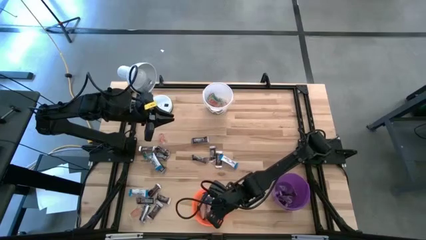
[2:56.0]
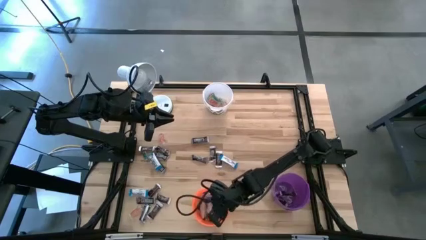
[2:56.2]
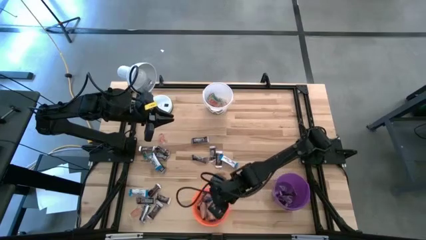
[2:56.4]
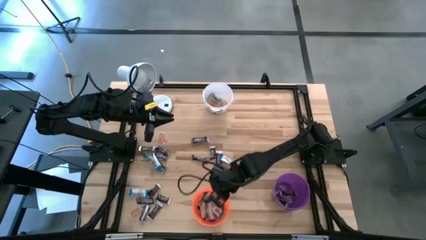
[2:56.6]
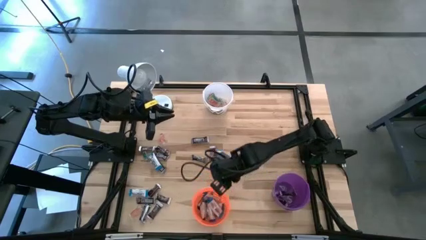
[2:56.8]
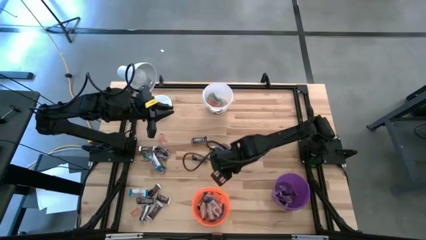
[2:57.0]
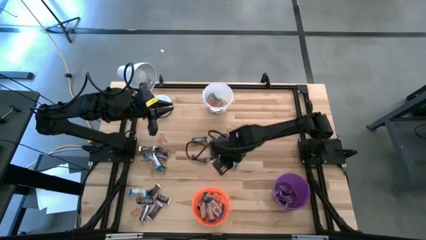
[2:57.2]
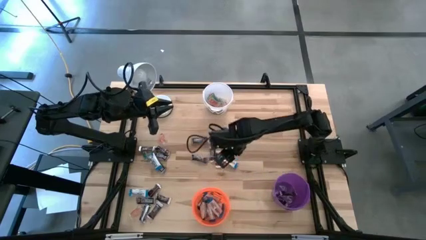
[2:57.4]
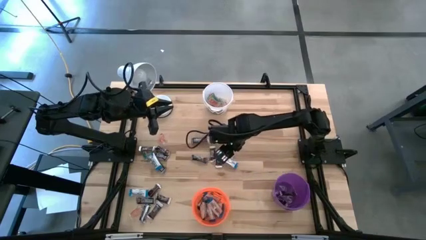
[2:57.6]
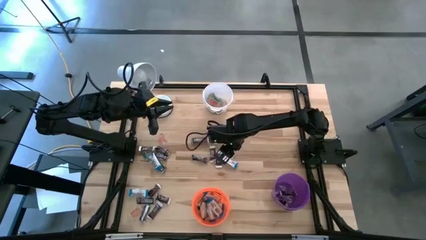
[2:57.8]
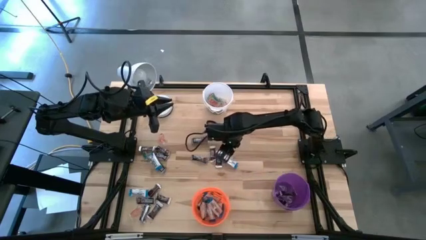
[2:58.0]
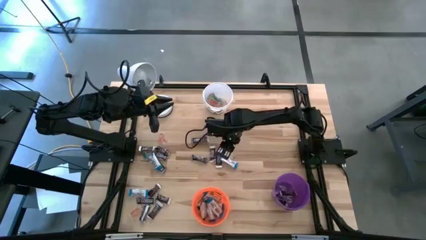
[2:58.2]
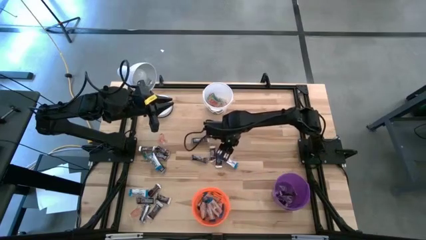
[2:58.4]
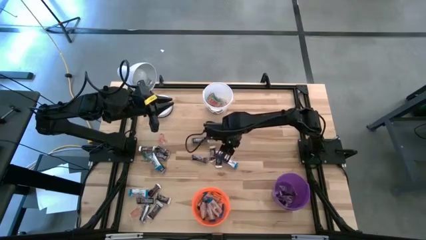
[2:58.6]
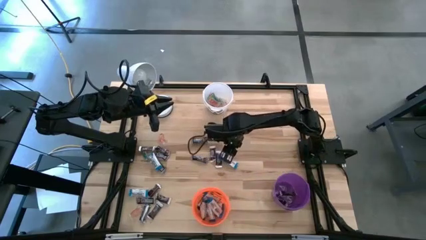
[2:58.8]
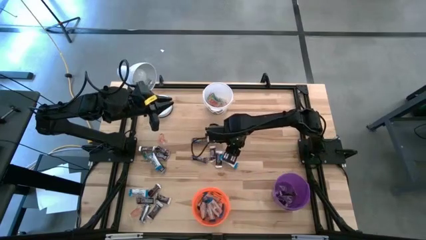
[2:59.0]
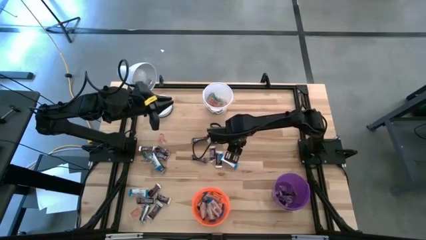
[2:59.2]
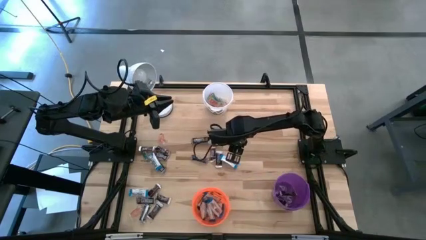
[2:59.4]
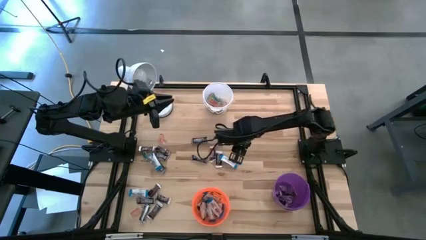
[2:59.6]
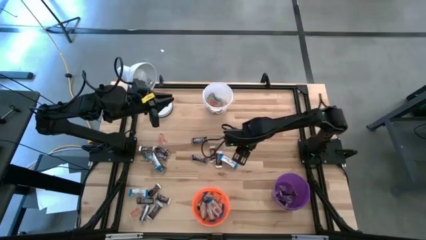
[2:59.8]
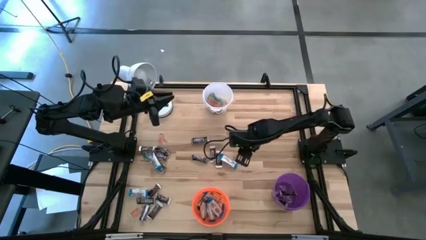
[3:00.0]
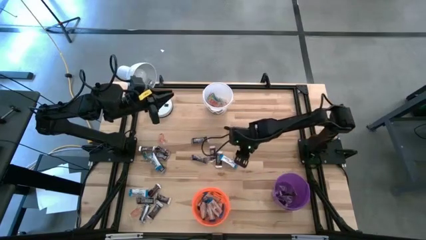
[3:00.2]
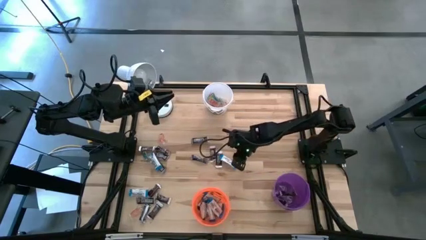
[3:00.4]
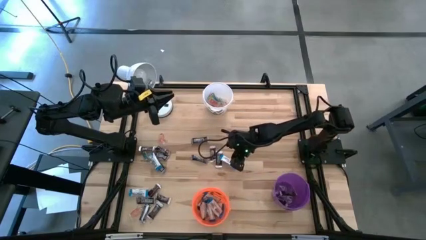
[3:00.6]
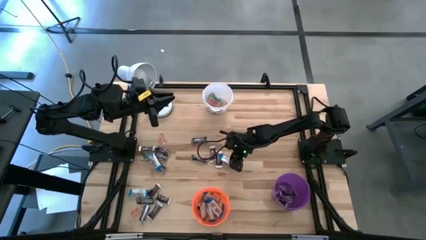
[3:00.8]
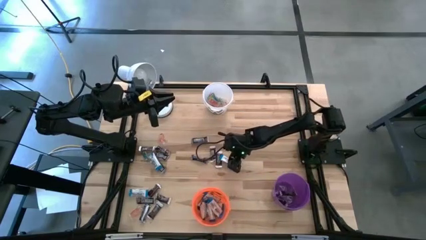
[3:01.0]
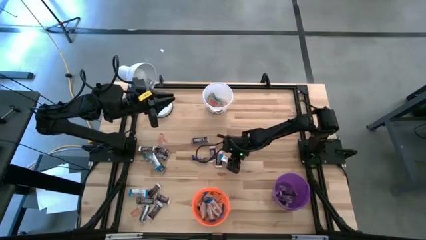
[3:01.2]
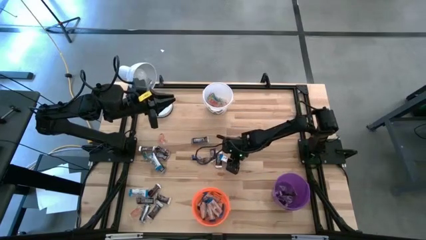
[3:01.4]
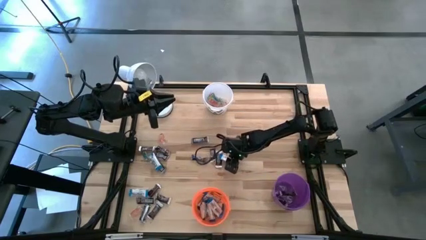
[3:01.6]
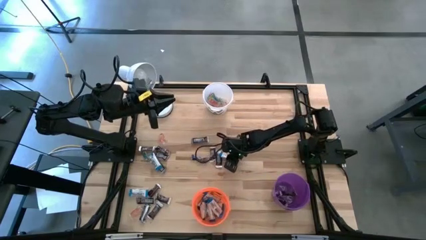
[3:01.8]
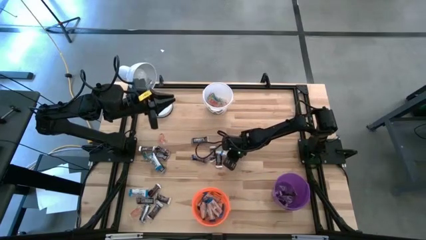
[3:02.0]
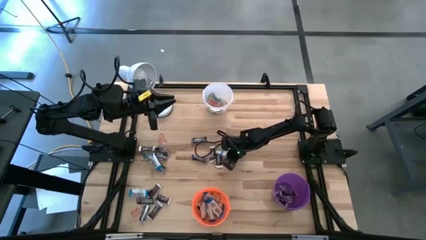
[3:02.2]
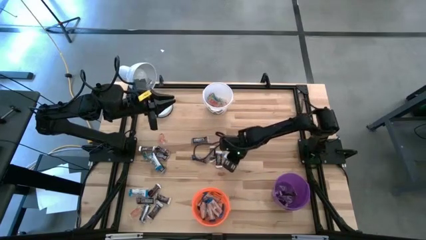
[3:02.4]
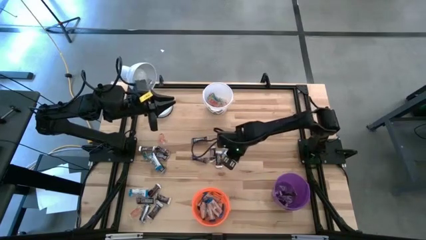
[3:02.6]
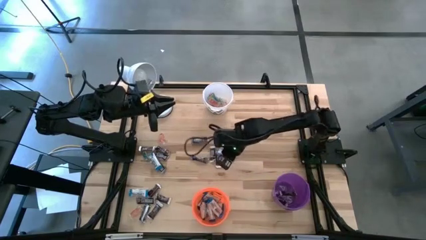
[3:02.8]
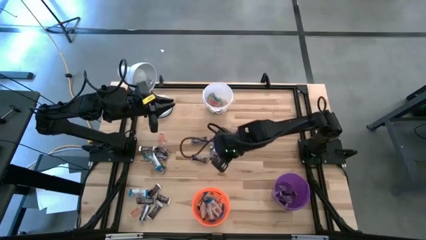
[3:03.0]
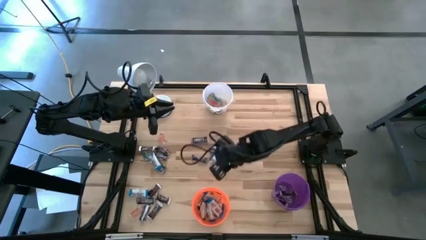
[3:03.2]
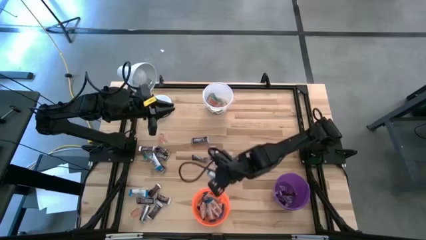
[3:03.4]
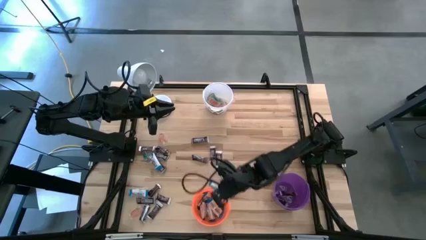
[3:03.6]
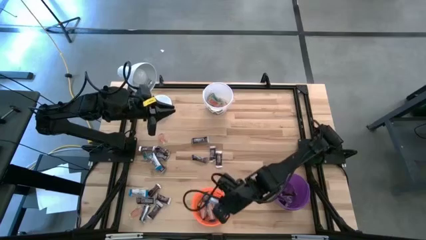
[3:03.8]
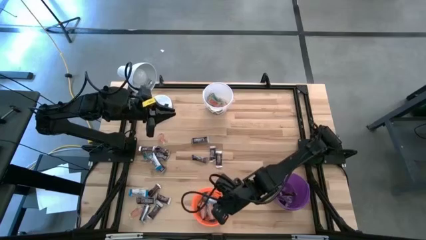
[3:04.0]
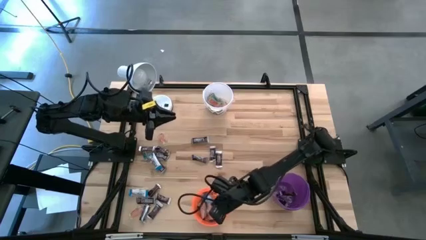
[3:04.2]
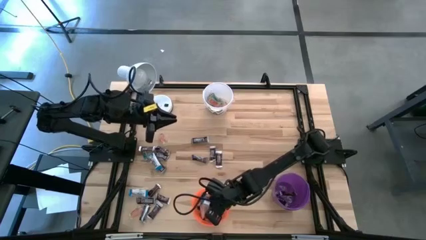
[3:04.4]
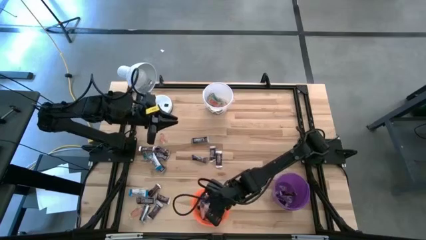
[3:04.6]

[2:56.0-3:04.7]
Task: Organize candy in baskets
Put the white chocolate bar into the orange bucket

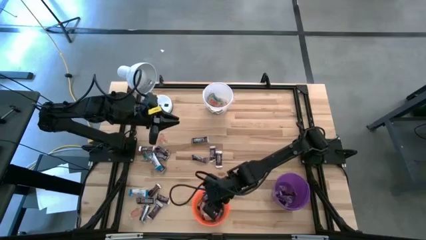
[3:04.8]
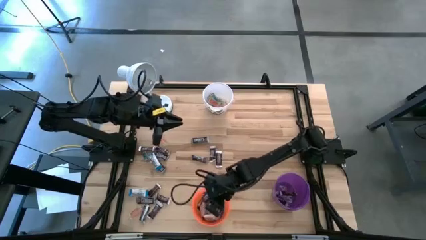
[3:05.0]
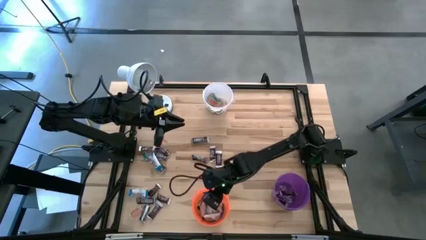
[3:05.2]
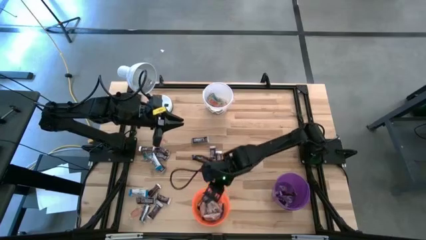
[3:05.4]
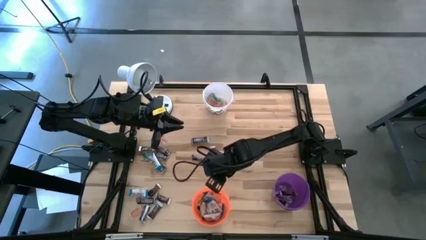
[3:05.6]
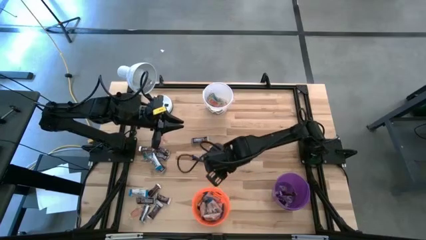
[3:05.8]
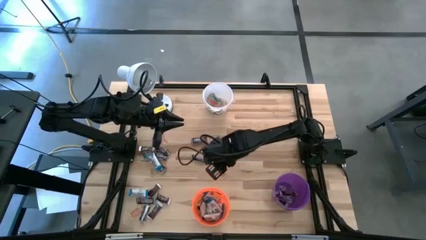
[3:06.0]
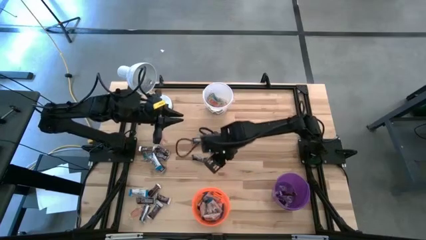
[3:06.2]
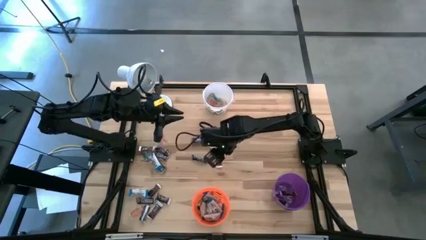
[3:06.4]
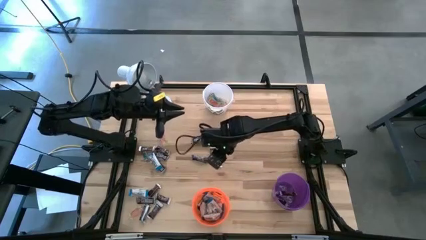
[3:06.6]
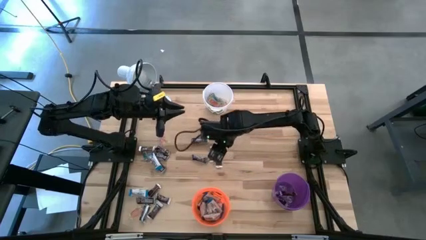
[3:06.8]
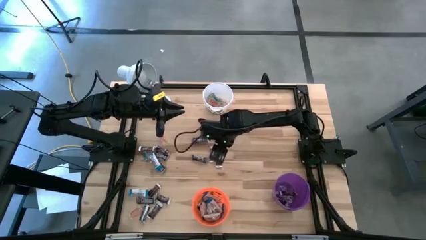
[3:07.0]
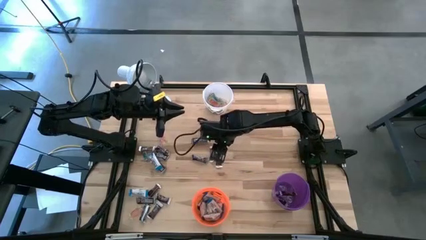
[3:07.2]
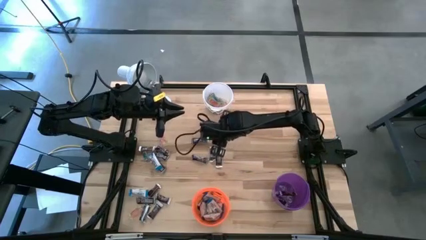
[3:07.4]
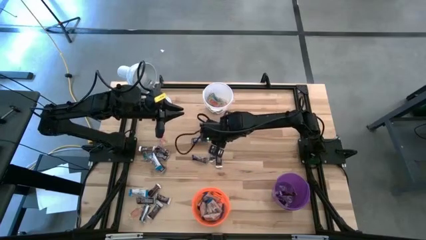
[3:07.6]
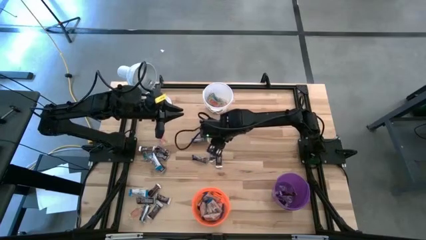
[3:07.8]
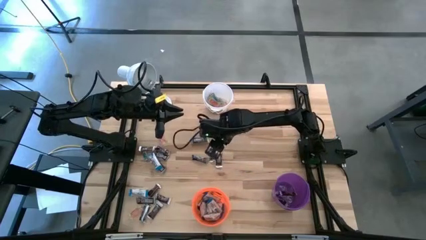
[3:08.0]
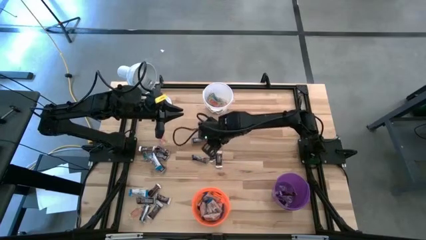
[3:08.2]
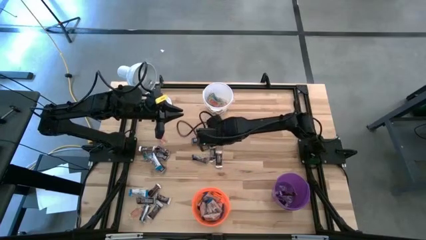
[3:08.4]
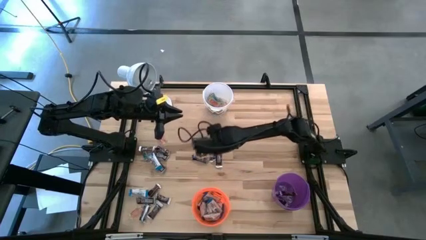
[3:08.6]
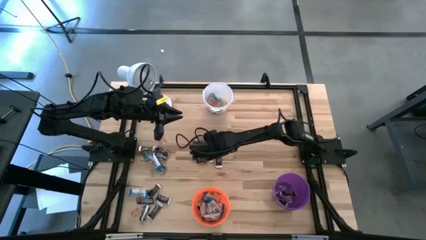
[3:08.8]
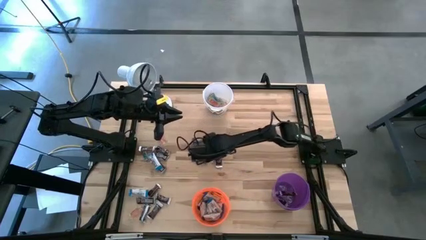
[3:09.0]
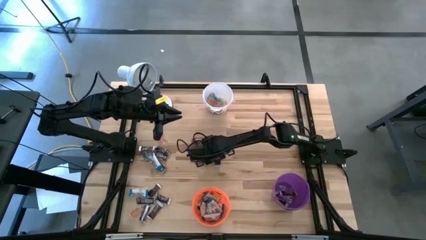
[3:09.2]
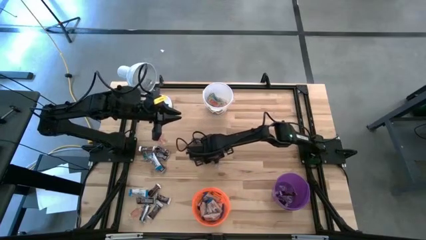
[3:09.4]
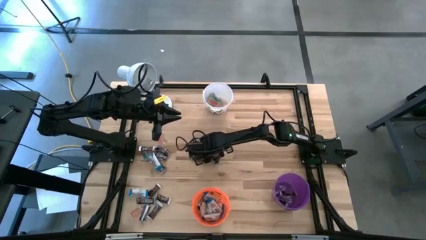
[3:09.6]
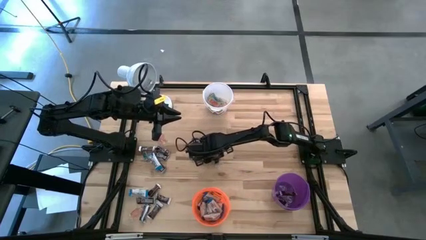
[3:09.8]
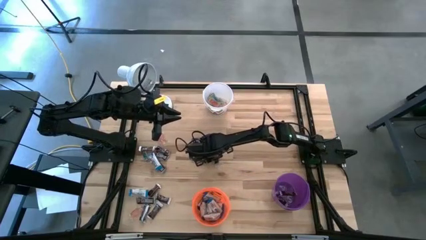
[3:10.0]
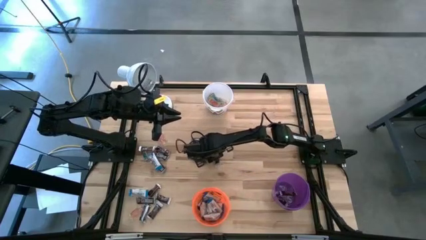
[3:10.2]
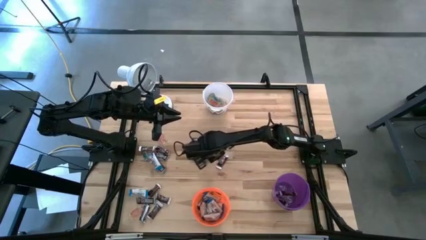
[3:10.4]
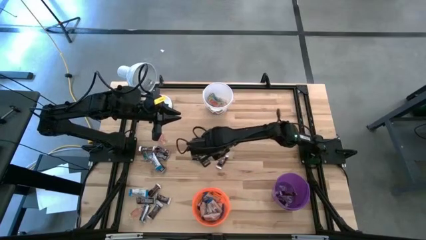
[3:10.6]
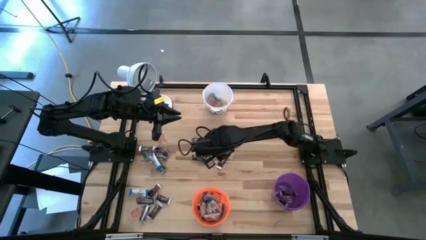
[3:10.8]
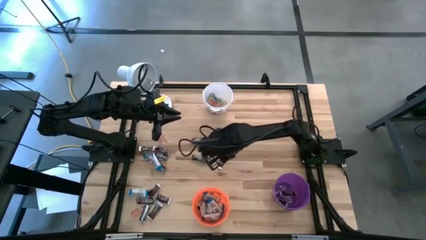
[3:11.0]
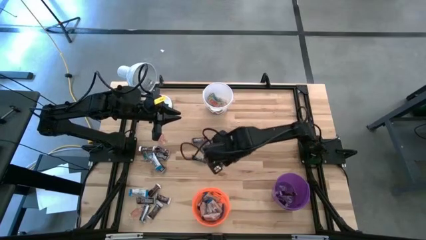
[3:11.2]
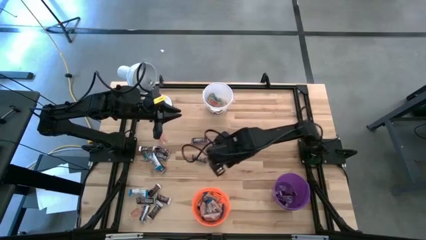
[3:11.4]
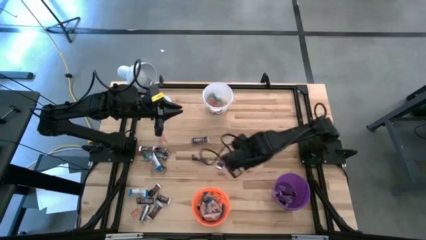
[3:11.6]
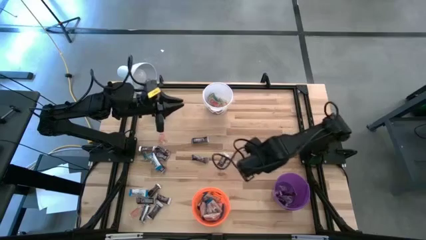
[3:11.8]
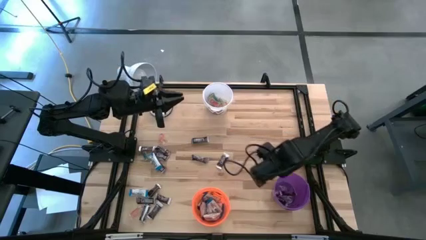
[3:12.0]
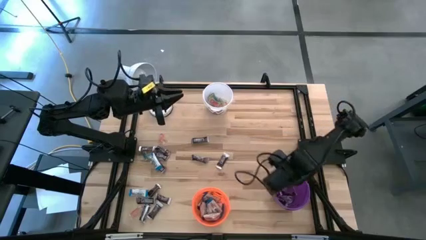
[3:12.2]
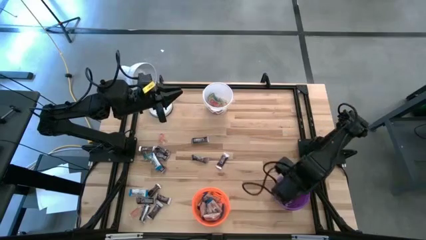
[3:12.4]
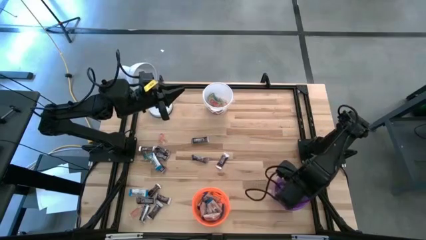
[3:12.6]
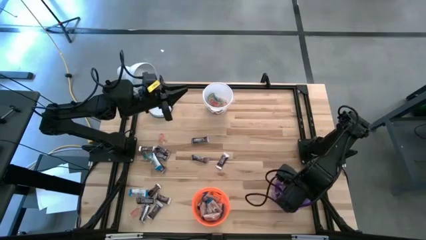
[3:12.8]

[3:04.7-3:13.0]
Put the dark brown chocolate bar into the dark purple bucket
